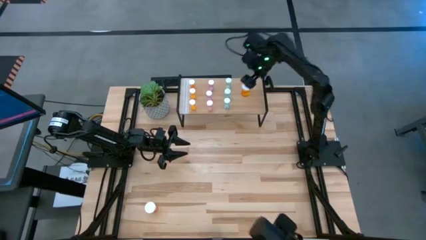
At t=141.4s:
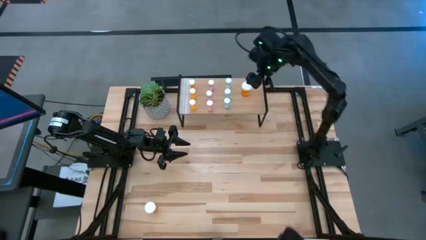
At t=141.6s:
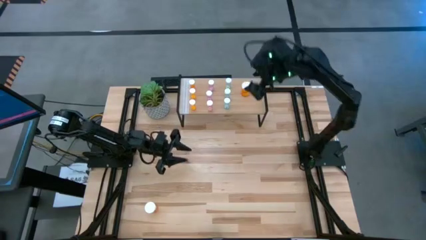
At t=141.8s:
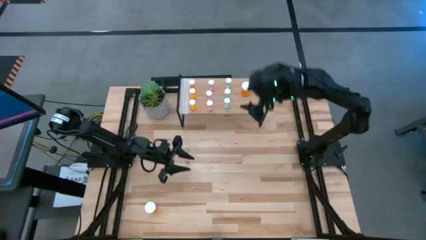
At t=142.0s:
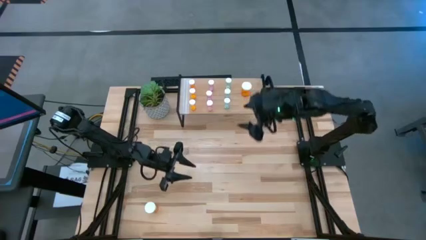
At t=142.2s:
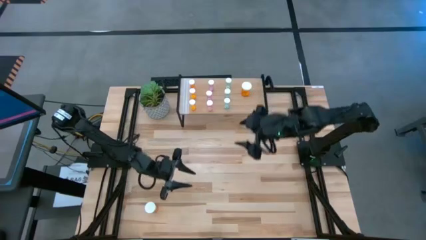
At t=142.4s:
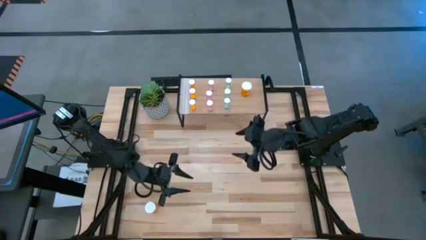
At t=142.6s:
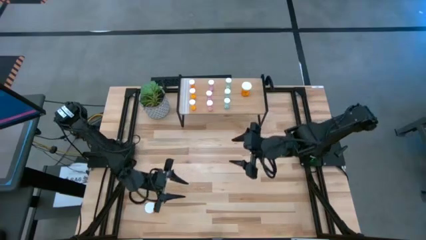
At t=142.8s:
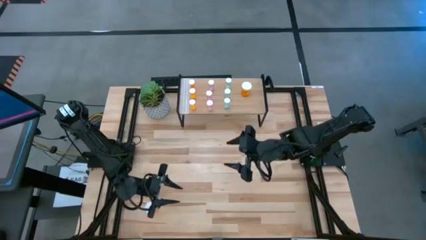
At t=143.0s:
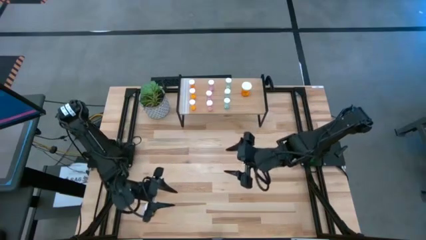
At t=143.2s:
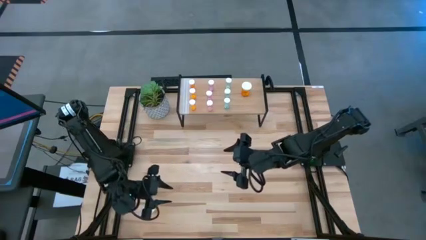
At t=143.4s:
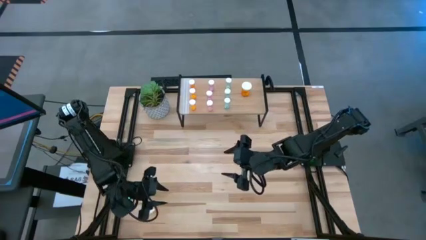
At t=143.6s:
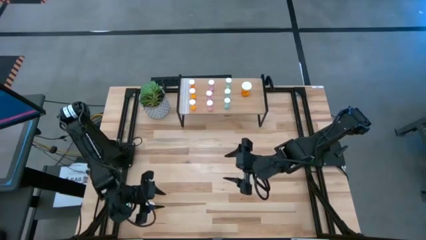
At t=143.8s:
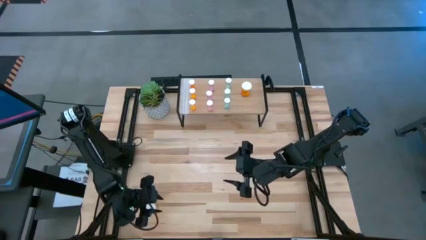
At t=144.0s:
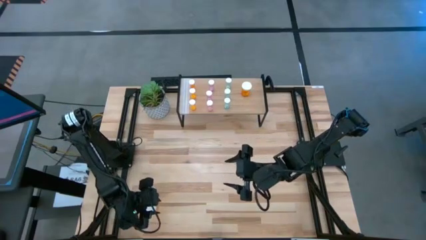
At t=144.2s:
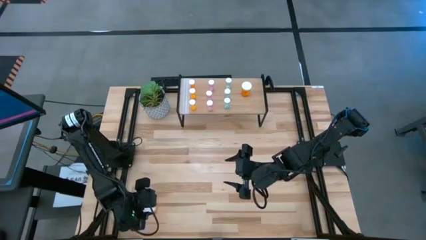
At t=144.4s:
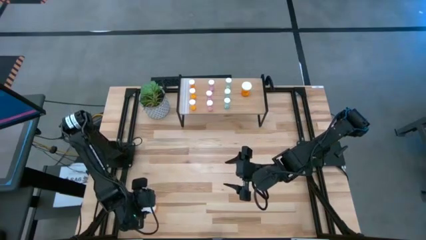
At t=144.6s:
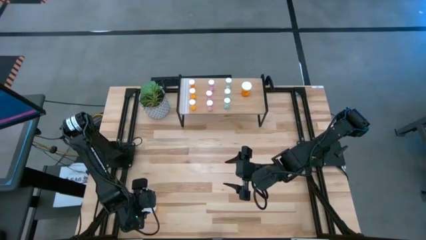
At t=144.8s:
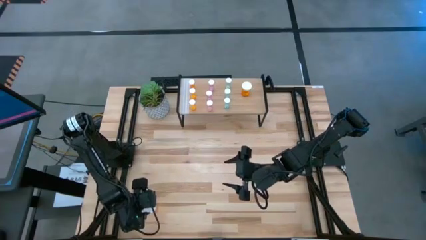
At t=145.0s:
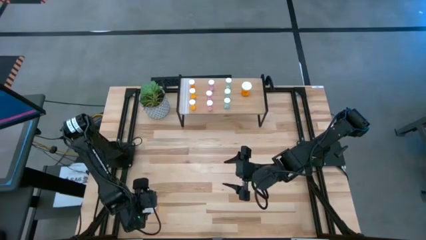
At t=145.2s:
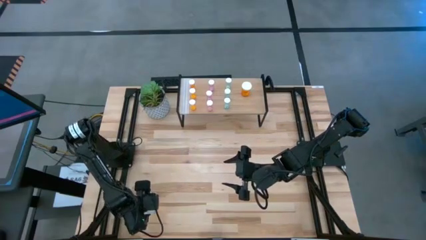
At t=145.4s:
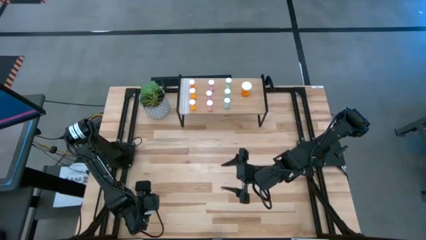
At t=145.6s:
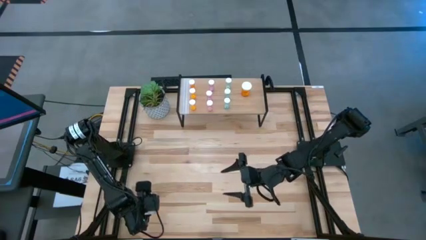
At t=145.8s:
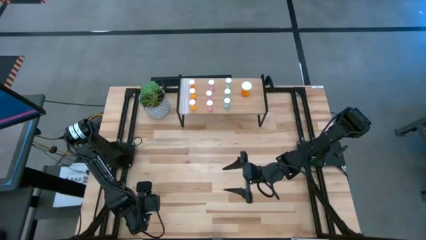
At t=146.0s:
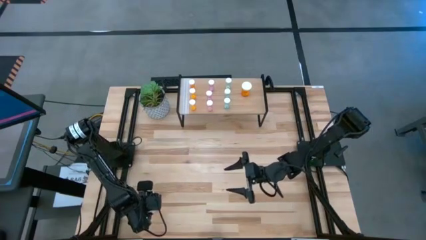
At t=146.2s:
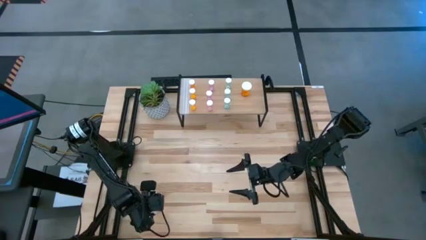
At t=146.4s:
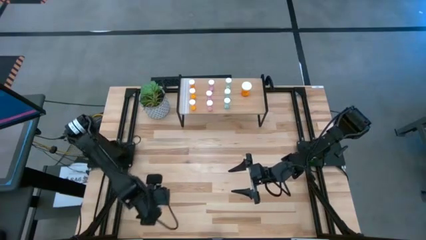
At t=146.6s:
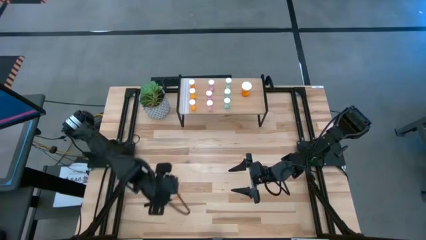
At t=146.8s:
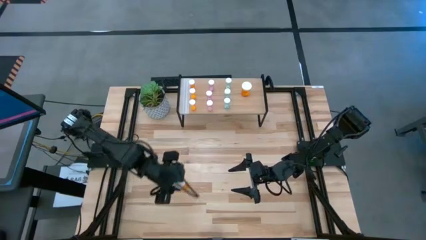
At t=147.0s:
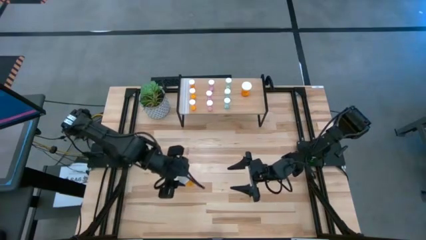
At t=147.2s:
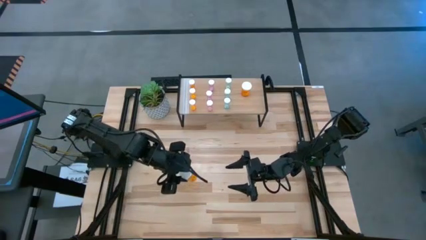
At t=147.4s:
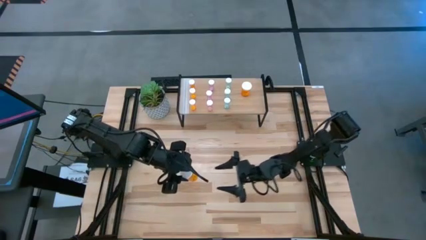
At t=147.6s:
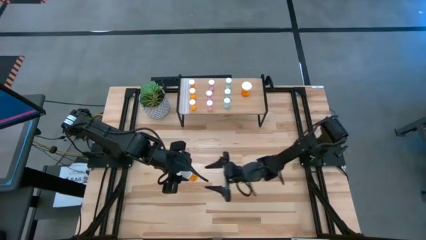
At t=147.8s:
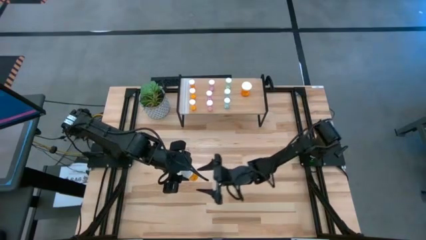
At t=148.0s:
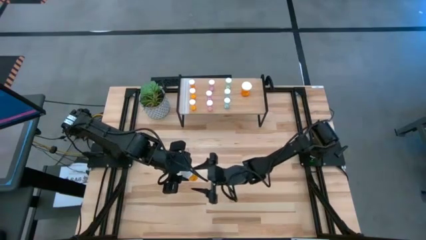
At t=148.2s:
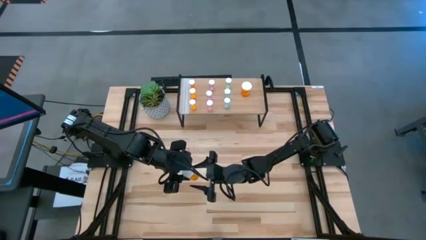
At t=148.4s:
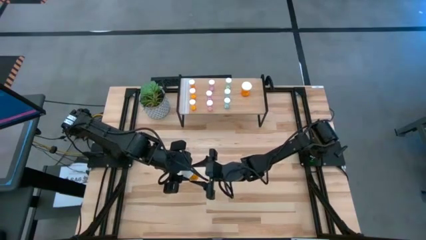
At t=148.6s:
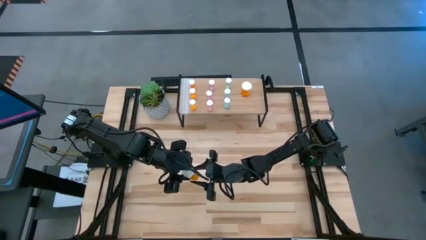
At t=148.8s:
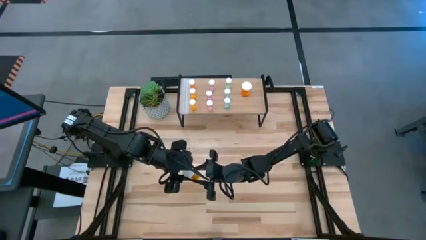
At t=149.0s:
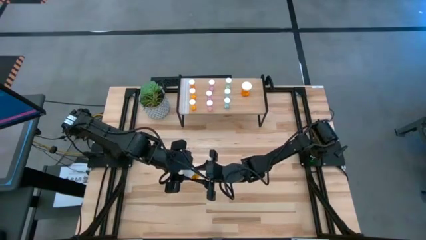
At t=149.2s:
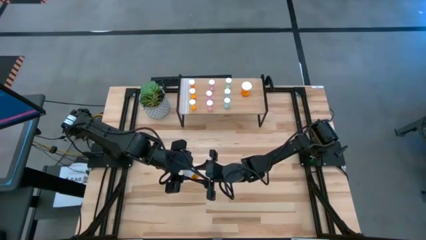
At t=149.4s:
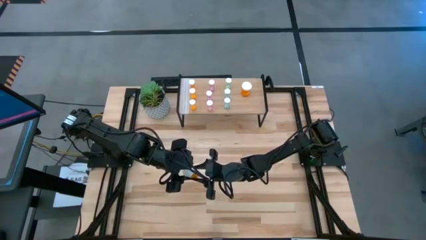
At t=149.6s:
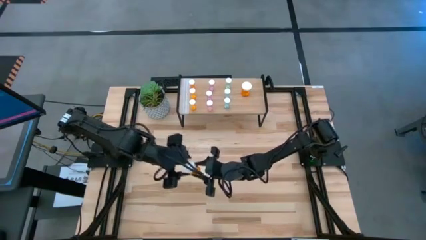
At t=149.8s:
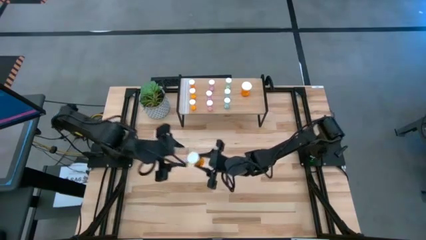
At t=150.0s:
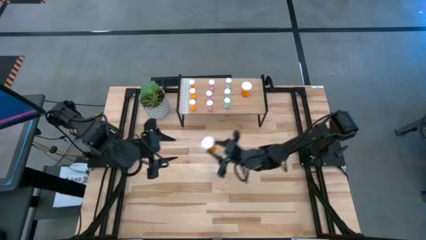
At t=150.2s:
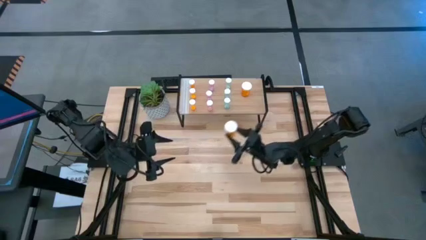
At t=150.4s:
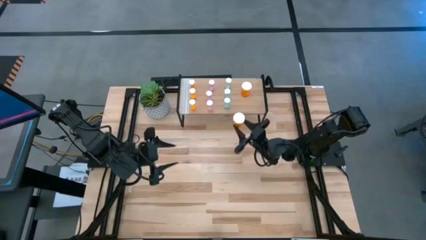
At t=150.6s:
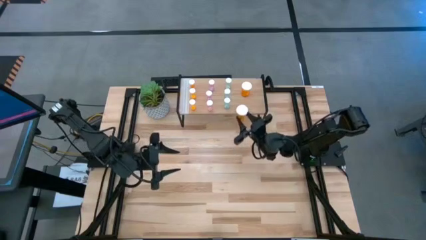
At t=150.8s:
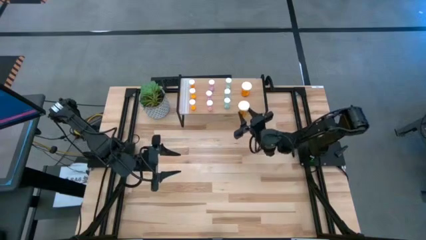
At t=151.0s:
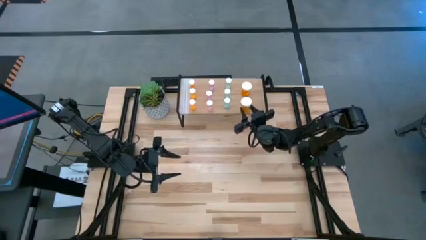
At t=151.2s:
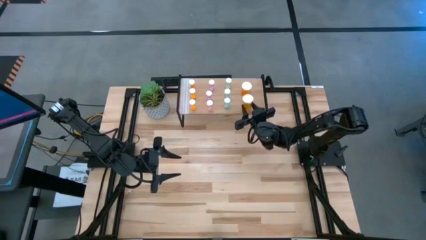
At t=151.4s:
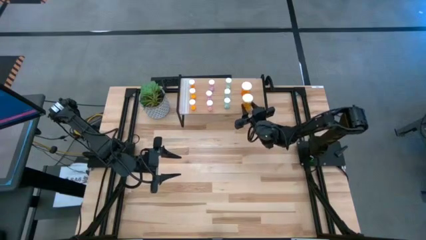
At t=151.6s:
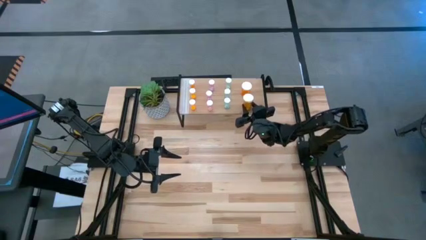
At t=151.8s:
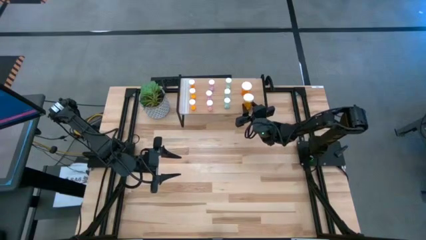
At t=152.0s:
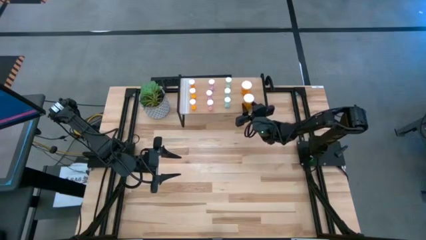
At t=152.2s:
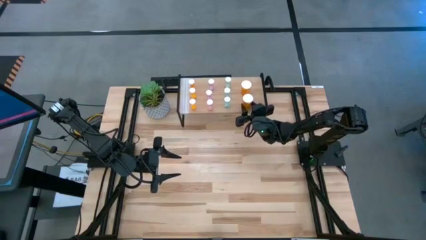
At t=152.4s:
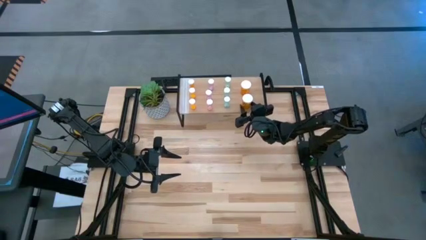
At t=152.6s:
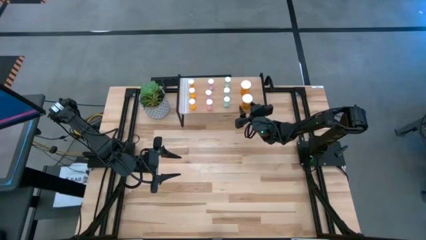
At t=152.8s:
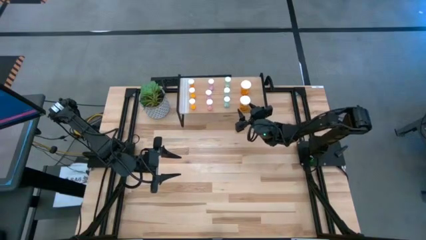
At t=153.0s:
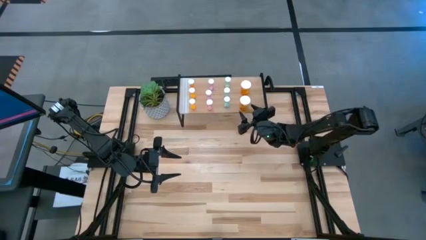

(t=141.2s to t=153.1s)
Task: Pick and place medicine bottles onto shelf by color
Put the big orange pill bottle on the shelf aligned with the other big orange pill bottle

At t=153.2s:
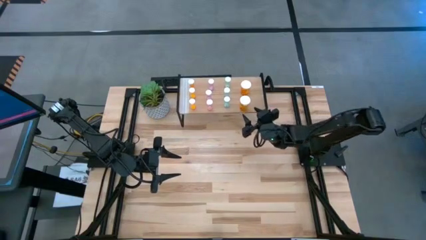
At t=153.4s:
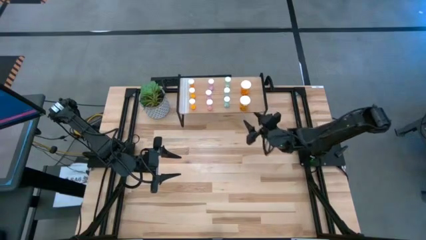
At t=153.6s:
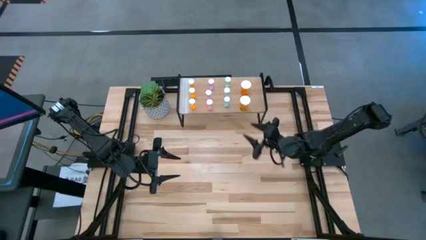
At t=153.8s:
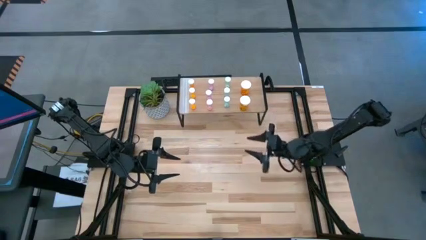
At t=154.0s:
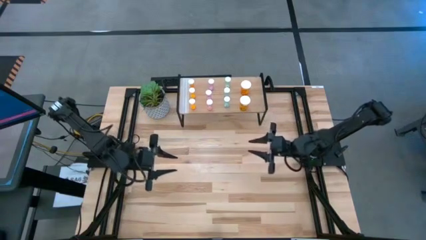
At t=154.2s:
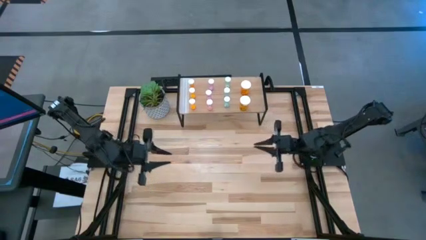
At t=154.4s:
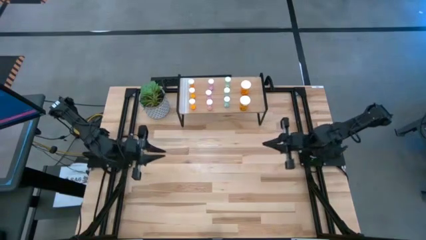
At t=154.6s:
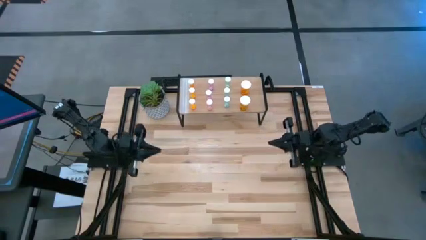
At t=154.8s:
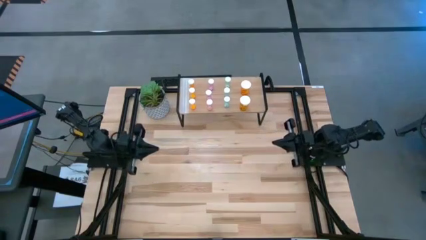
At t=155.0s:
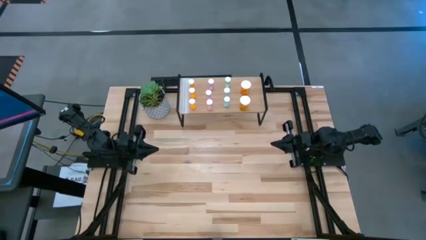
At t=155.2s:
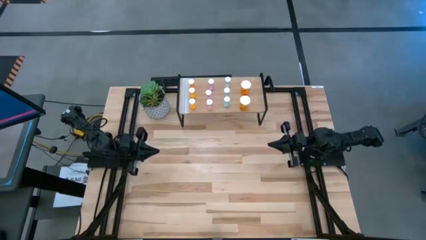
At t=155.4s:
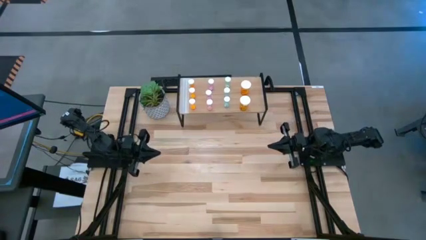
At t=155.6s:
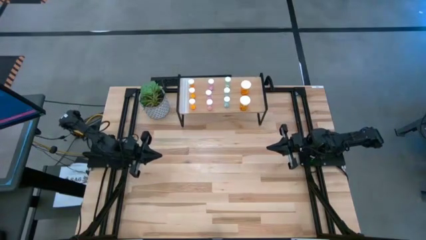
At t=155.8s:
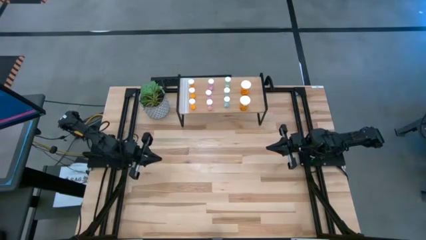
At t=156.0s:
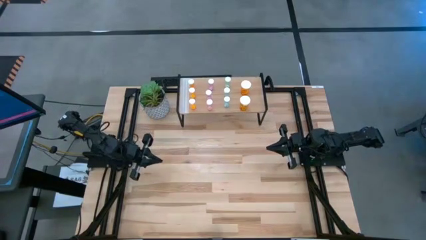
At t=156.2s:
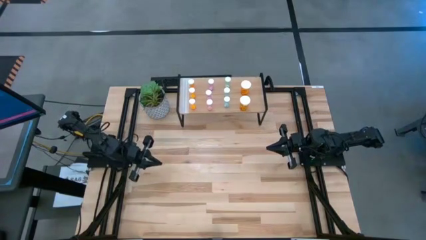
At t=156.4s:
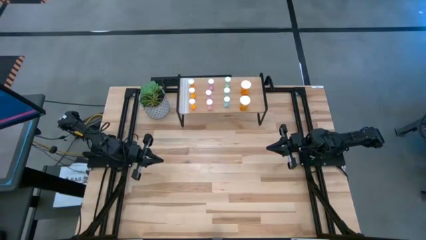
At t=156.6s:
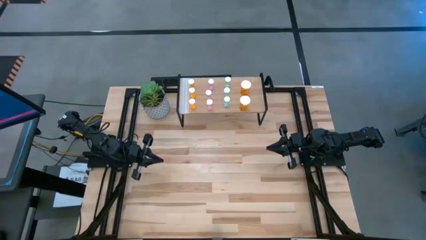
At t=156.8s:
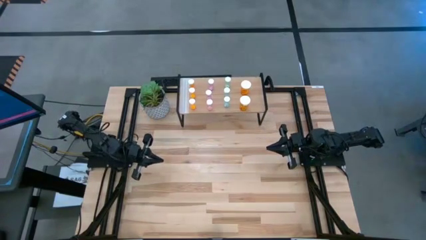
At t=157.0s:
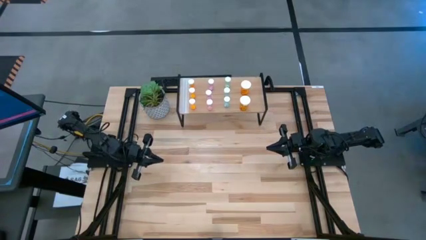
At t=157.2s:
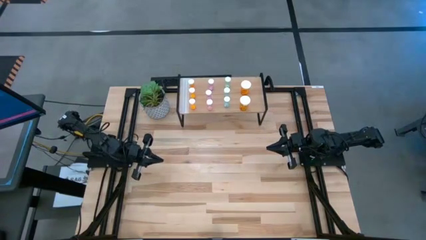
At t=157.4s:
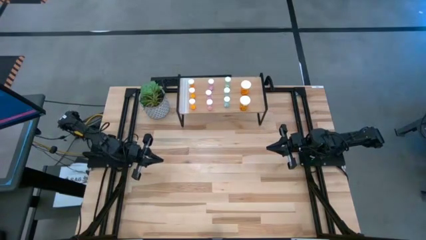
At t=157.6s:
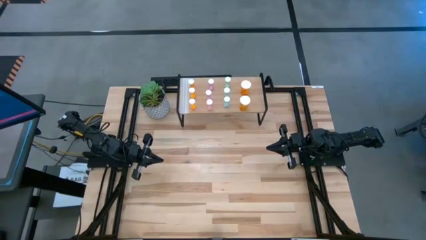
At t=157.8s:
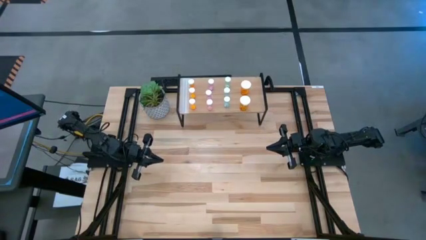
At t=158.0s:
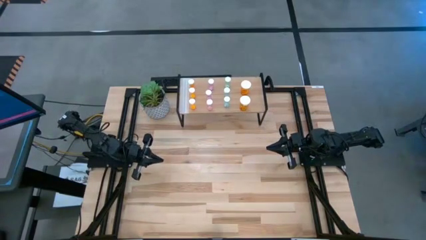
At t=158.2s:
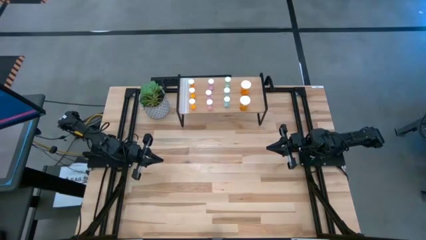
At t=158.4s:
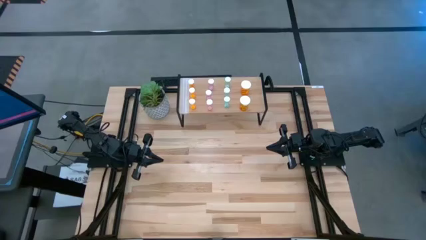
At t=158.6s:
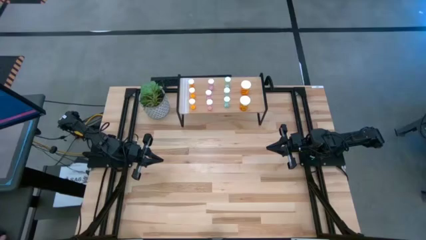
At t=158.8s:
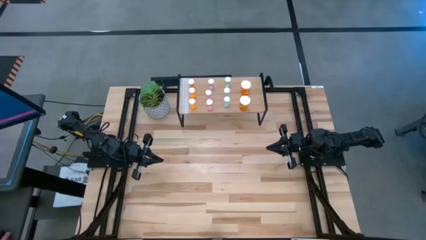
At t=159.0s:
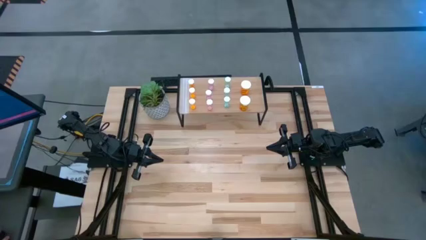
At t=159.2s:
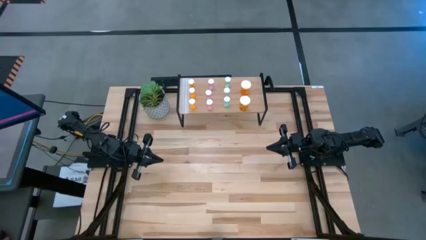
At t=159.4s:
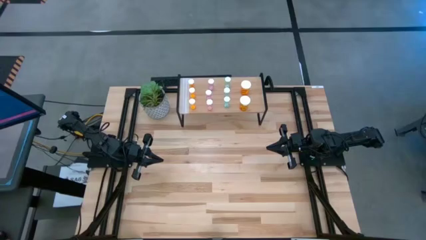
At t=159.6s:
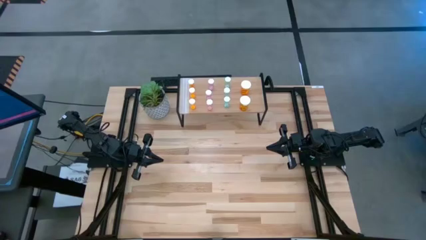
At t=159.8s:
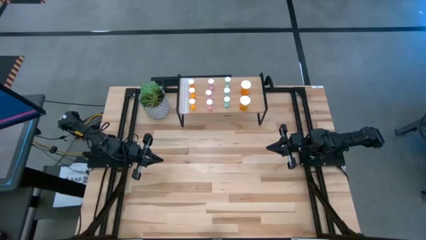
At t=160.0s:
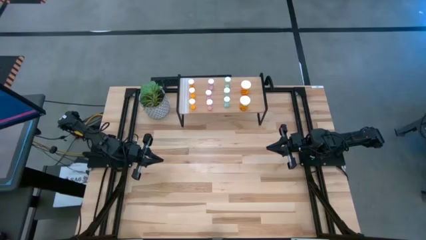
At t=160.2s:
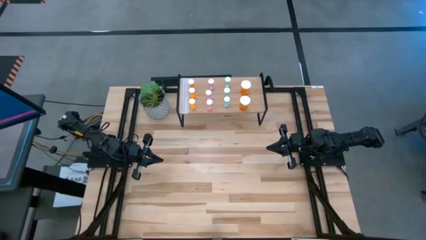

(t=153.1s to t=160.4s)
Return to Home Position
